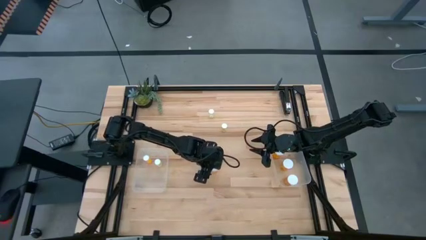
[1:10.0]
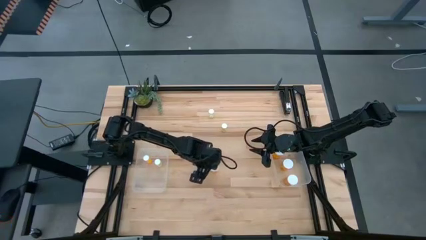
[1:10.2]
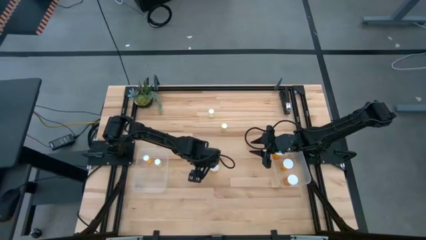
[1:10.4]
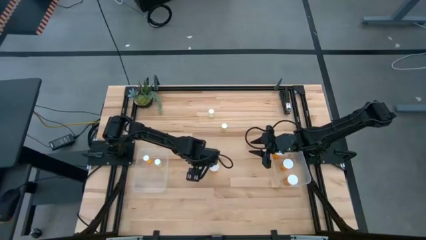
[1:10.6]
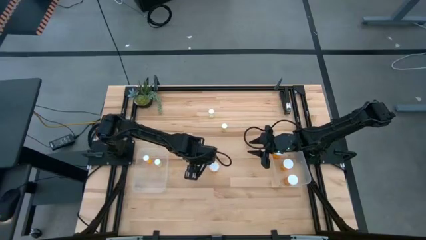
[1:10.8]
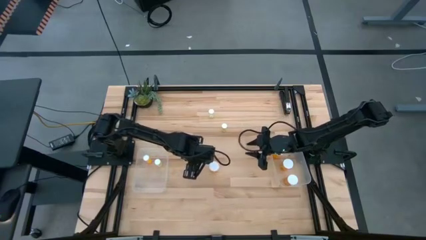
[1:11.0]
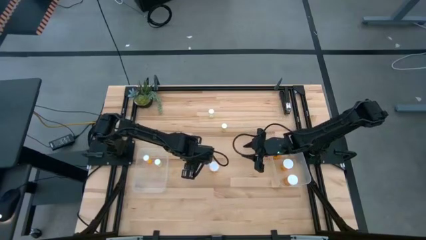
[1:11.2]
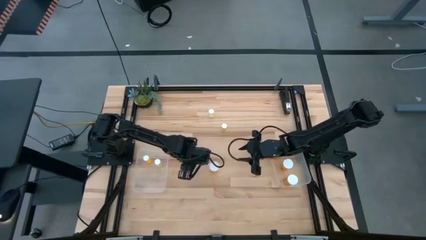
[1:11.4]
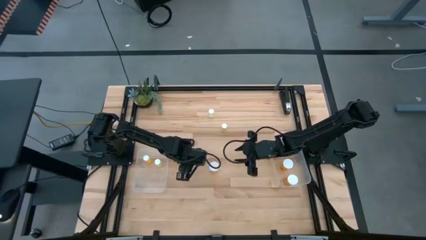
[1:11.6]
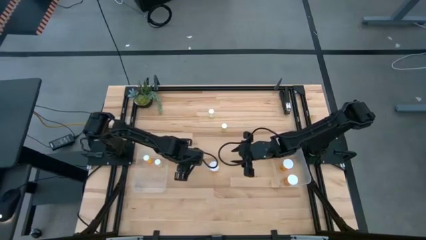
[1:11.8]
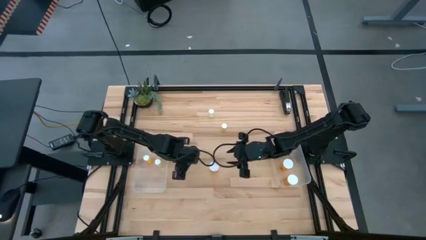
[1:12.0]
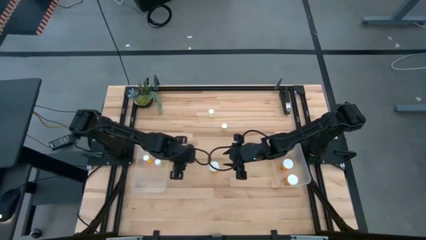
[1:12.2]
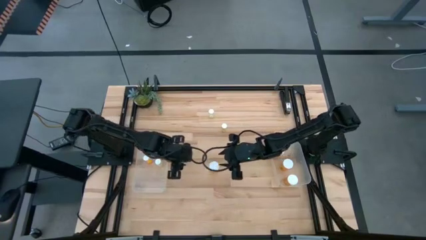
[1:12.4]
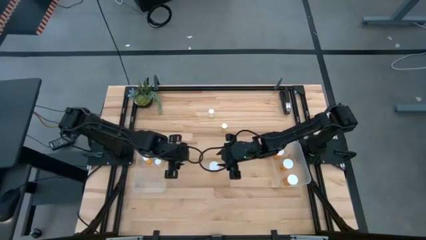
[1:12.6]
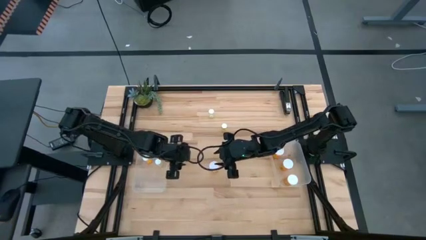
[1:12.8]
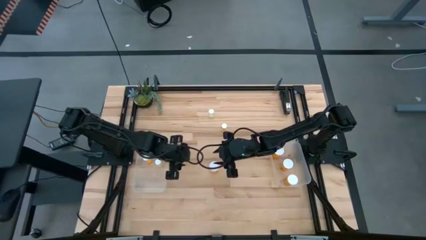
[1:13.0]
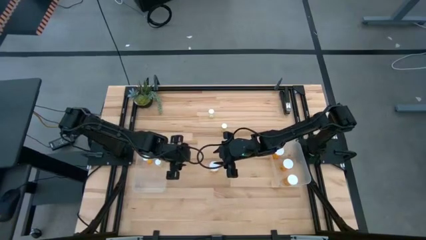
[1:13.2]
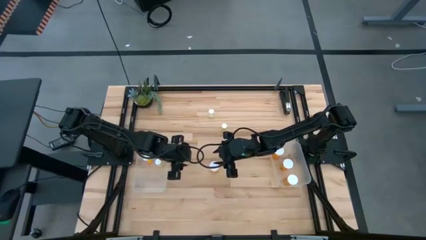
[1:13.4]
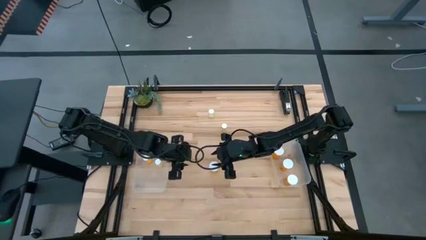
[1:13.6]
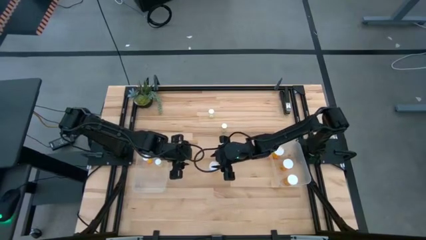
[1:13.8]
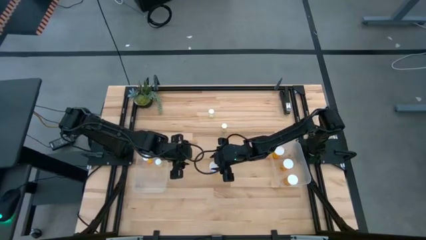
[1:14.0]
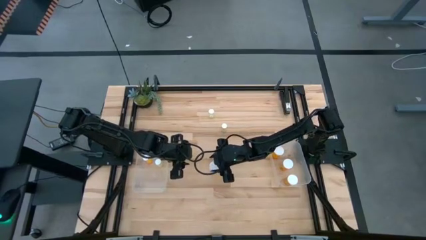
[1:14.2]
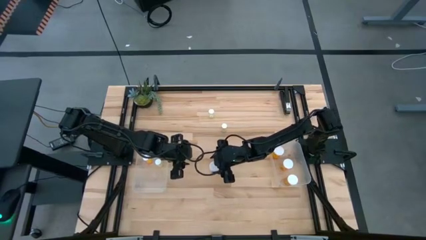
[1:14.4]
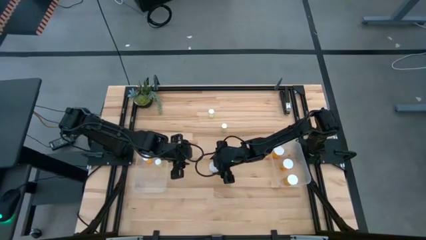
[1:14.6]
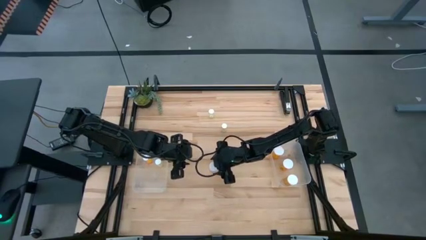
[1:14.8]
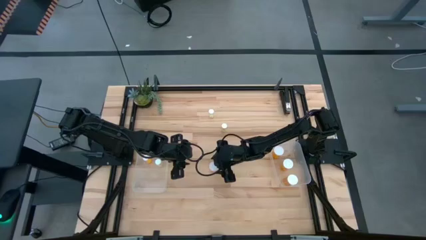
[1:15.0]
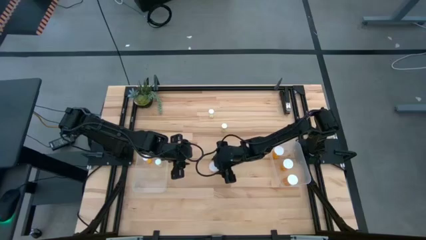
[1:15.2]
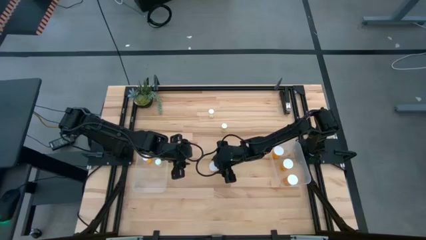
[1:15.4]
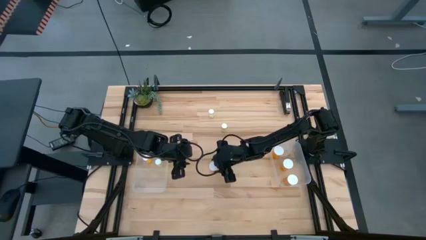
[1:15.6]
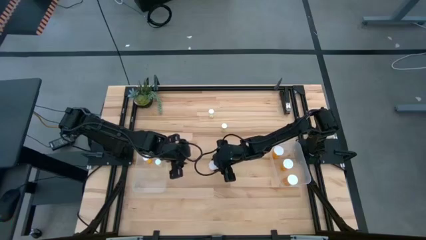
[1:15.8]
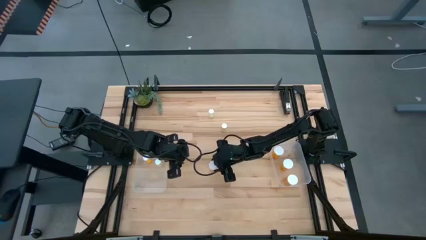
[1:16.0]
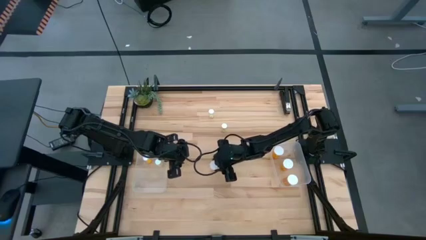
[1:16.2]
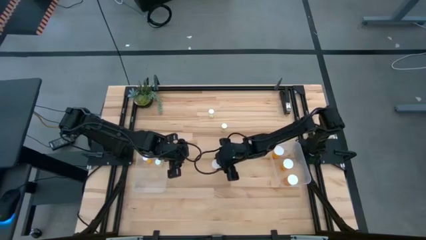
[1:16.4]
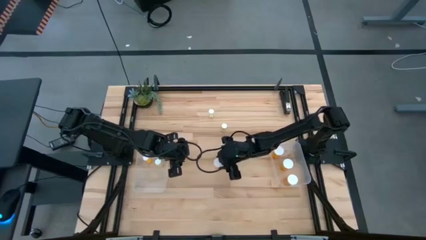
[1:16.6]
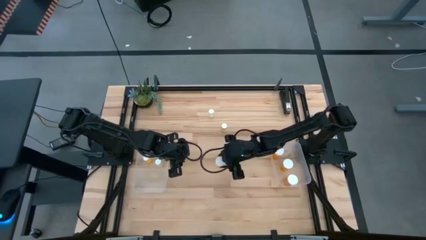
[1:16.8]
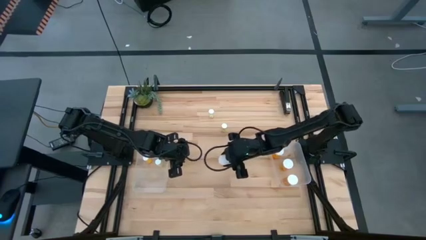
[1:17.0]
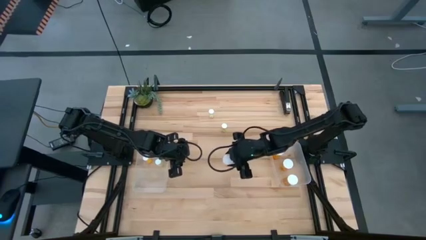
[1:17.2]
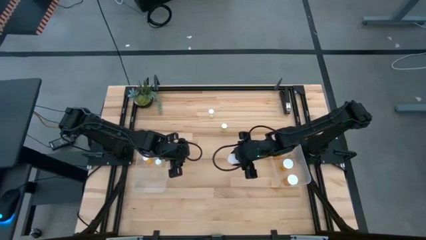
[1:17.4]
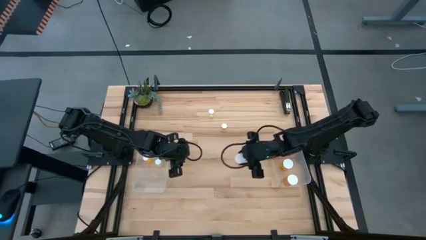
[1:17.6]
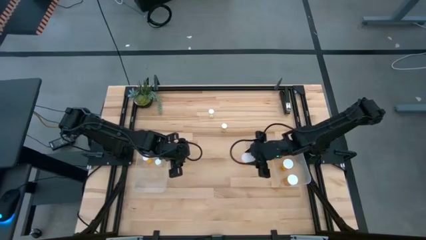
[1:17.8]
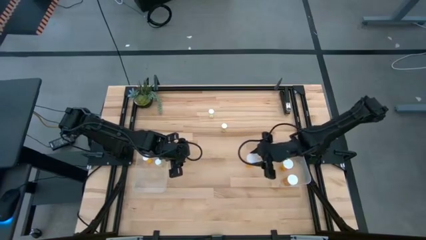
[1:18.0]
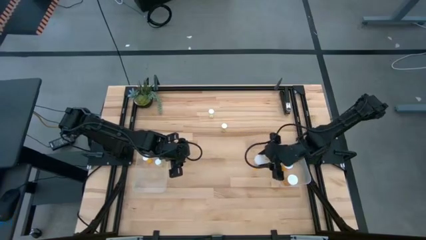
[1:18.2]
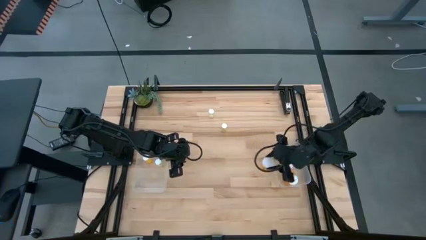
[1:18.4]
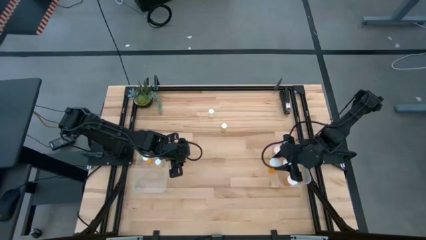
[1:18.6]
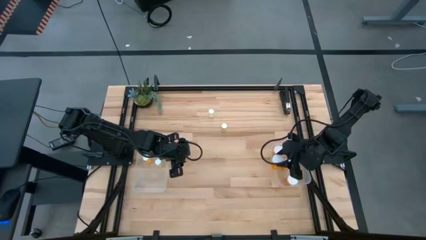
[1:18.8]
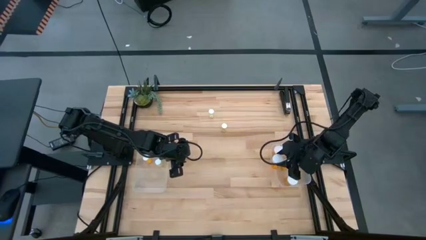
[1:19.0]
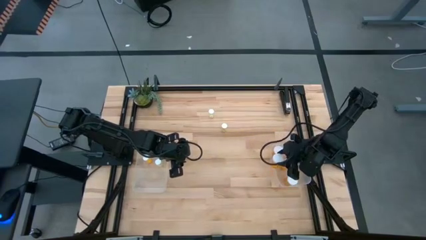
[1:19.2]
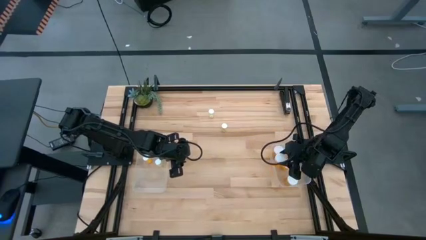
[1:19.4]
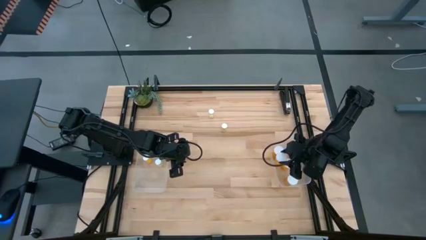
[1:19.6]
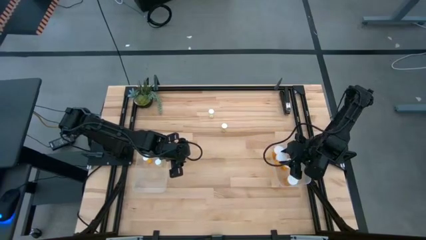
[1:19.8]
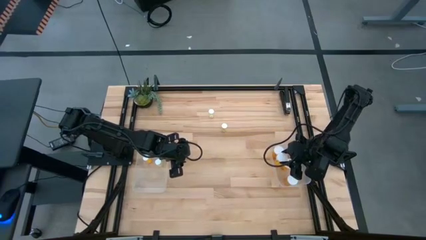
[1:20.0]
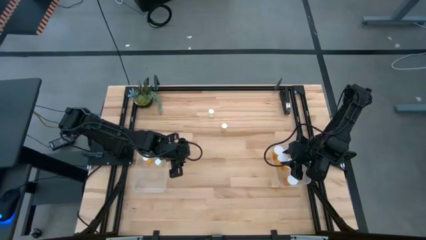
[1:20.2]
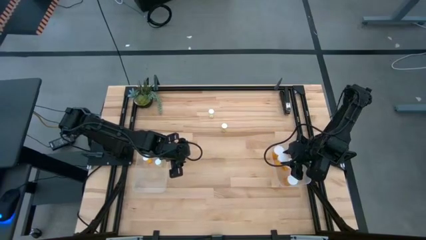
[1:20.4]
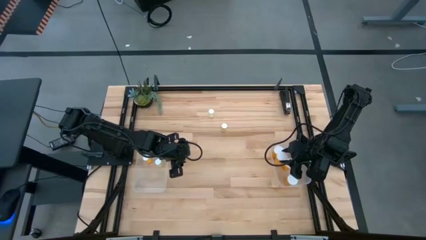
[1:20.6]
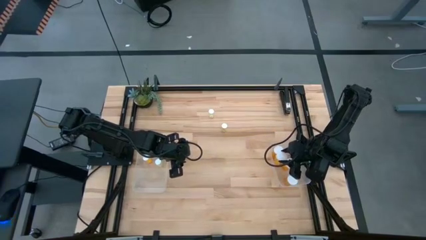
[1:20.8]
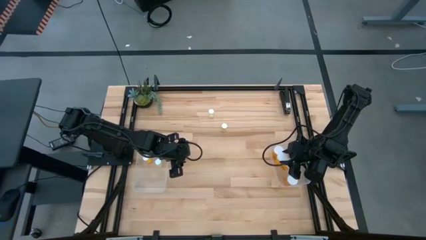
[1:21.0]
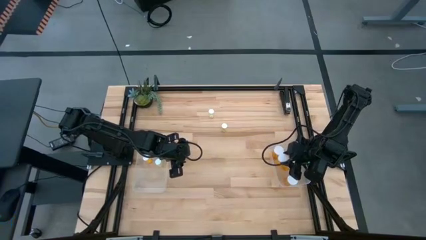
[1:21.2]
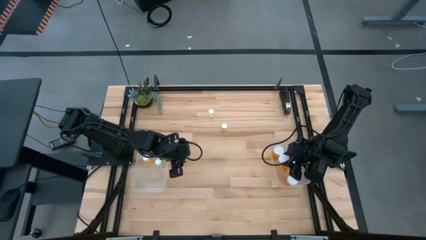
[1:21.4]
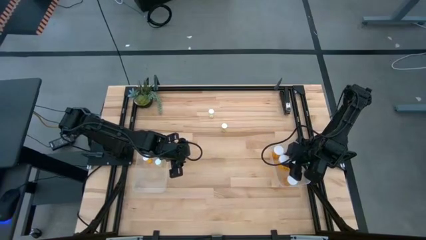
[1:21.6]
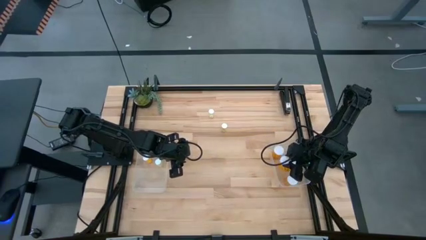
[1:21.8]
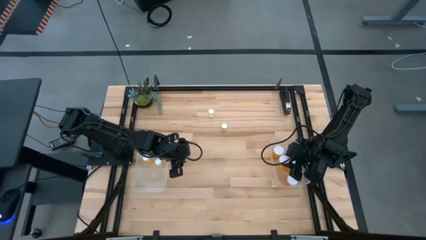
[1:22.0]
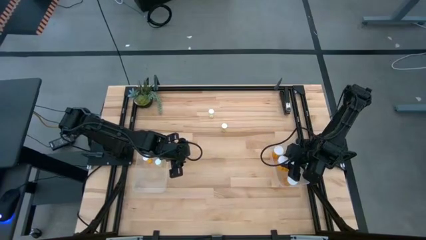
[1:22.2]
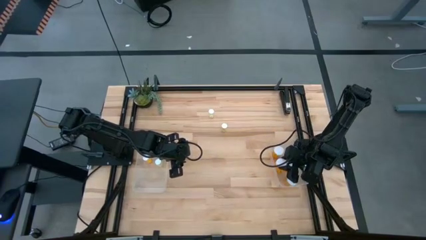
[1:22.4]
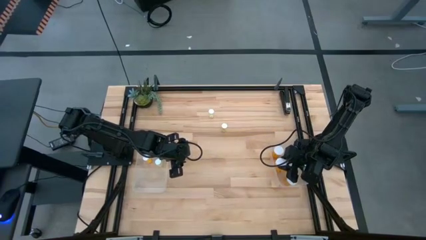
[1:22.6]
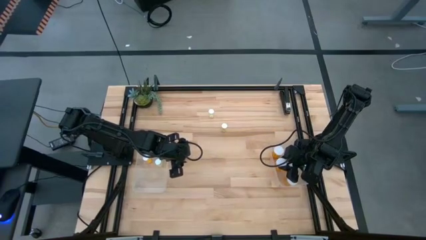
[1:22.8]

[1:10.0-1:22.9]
Task: Pick and place medicine bottles into bin by pill shape (circle, oval)
Put the big yellow pill bottle into the right transparent bin

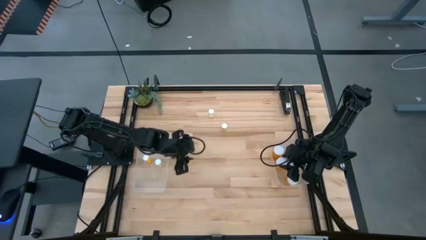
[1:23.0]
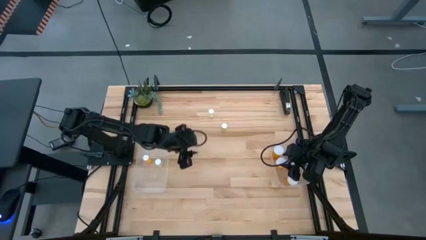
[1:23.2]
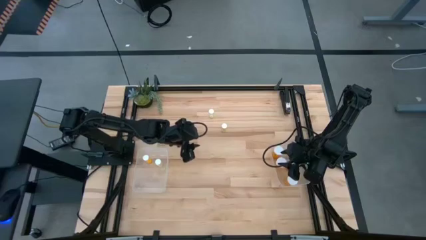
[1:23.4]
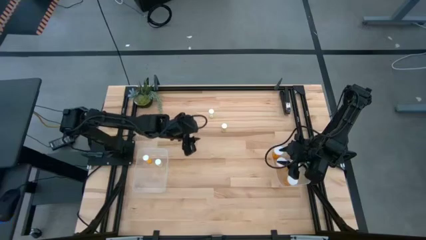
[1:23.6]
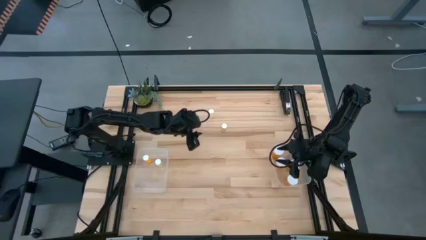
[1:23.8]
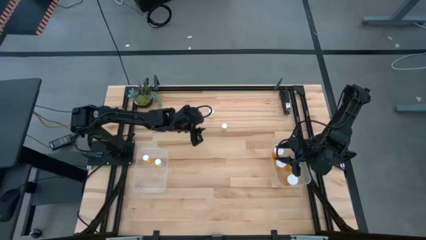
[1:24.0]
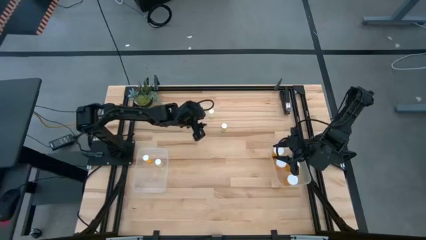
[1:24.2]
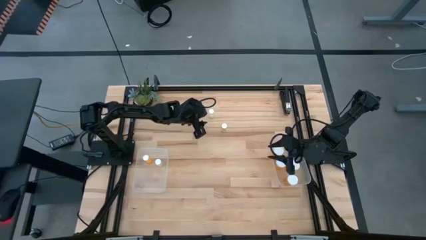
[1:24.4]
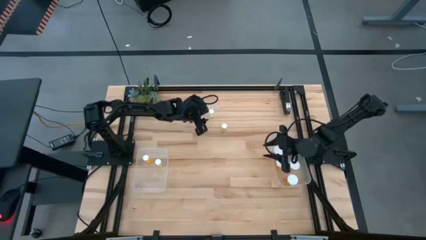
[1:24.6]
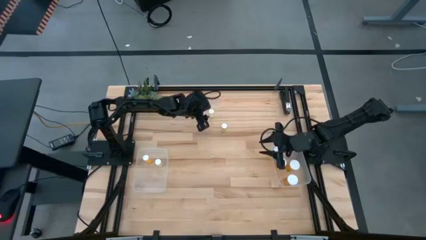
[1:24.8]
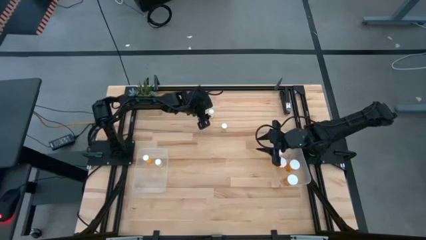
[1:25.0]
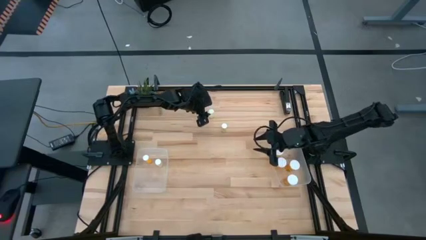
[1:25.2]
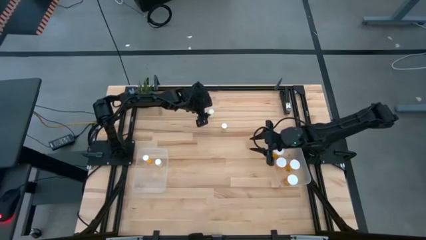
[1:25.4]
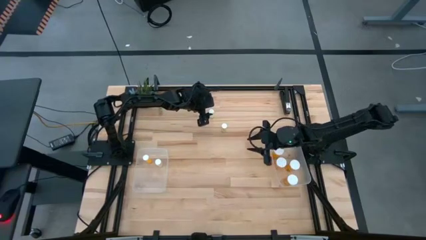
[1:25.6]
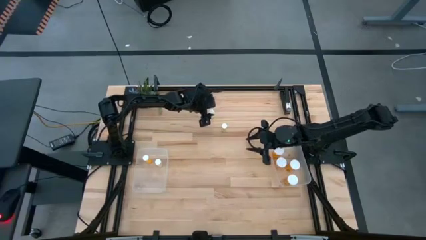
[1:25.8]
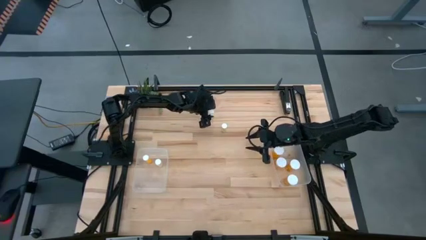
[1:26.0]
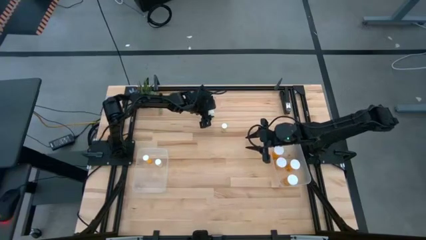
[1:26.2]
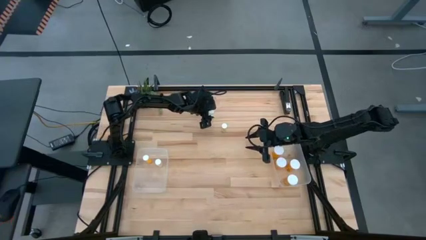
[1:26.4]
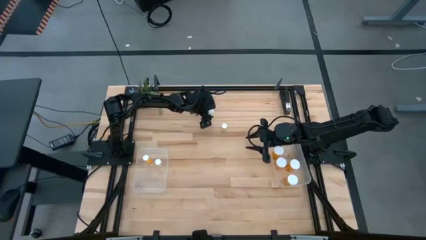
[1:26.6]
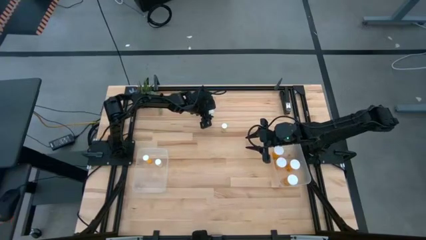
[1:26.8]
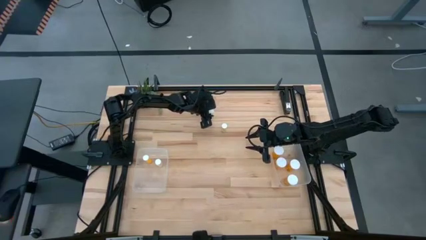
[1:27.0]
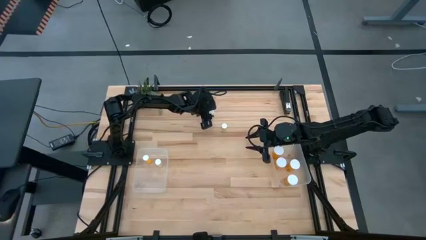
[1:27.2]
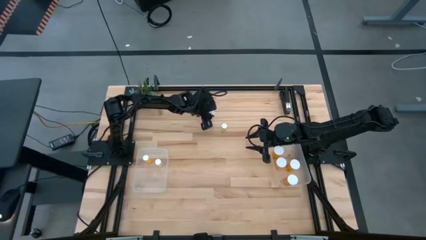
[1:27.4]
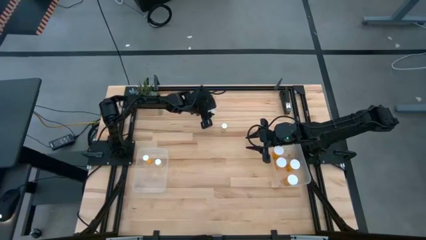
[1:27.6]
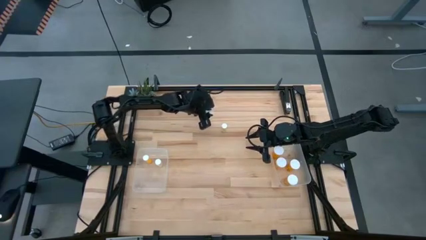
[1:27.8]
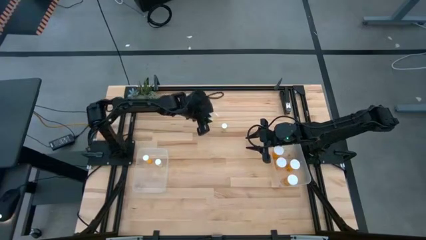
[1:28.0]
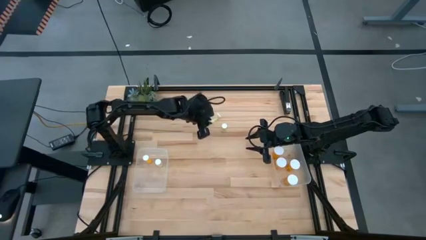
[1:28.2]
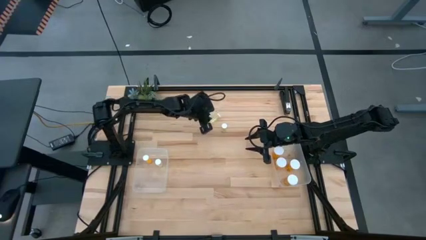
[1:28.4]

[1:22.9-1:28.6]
Put the small top light yellow pill bottle into the left transparent bin
